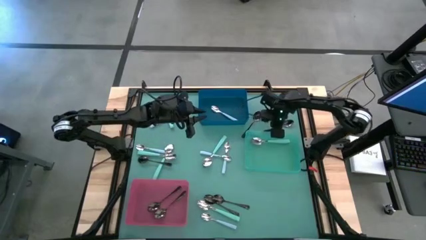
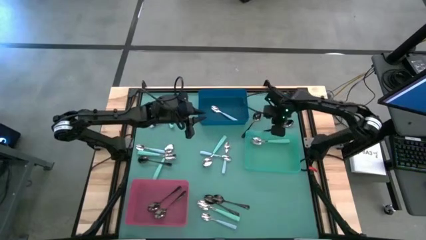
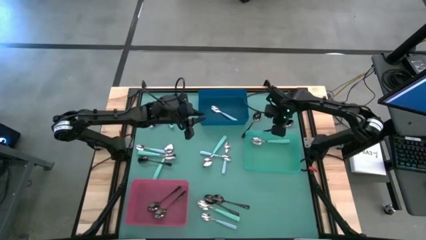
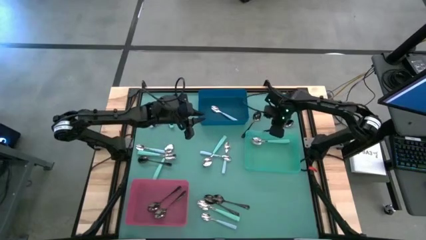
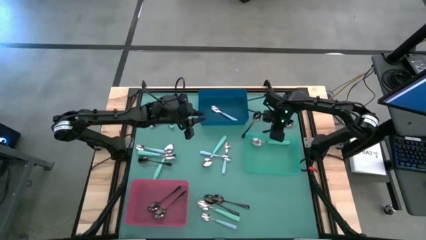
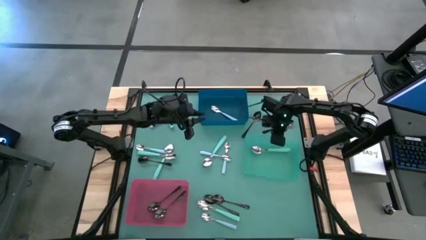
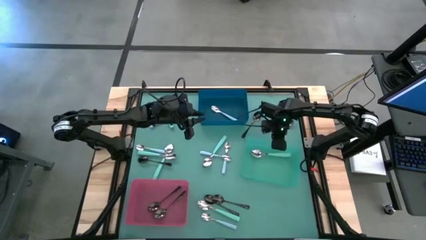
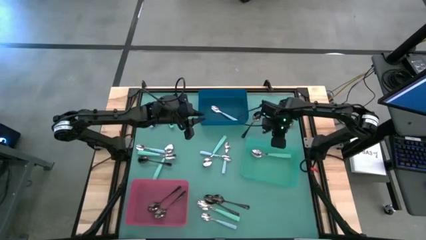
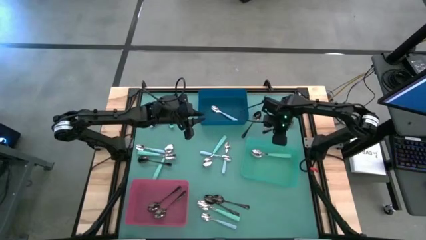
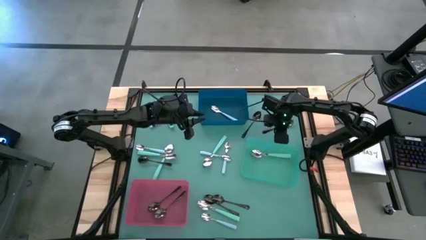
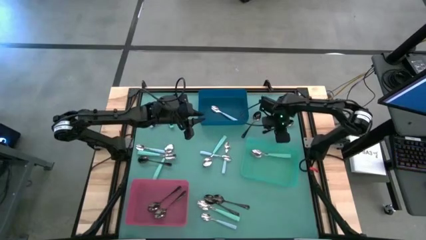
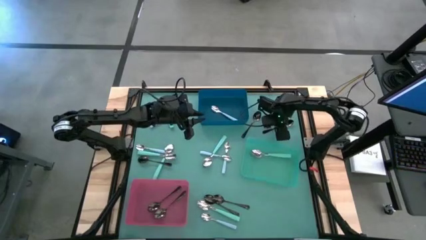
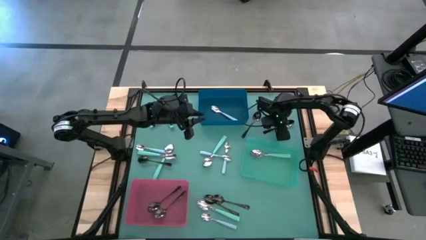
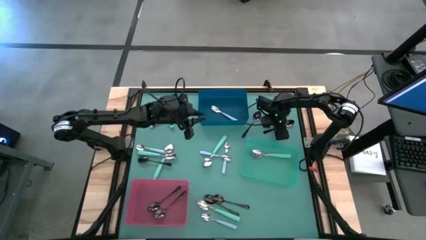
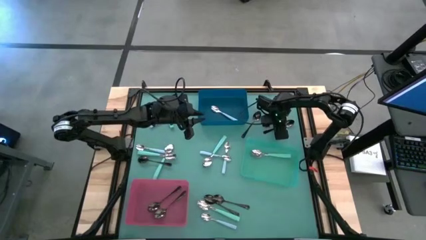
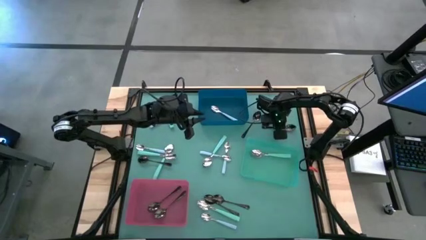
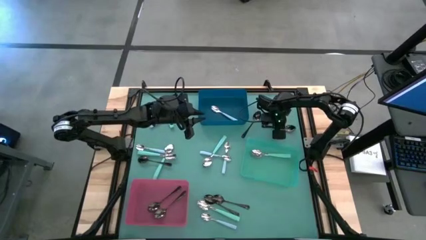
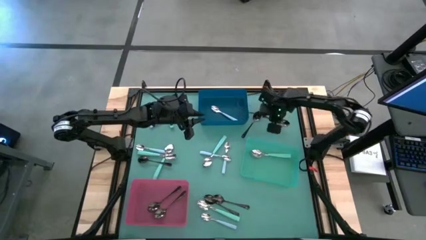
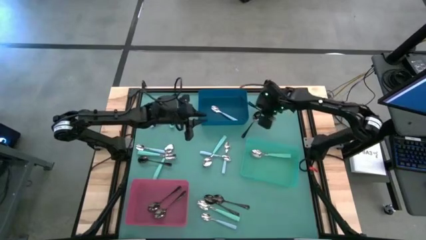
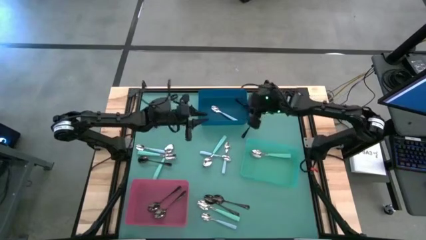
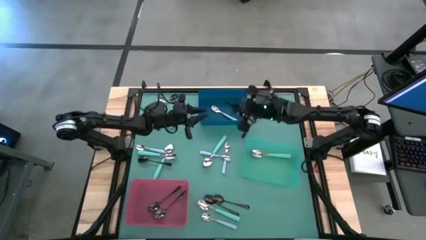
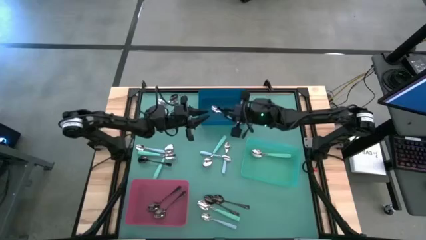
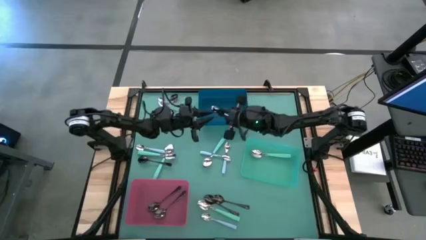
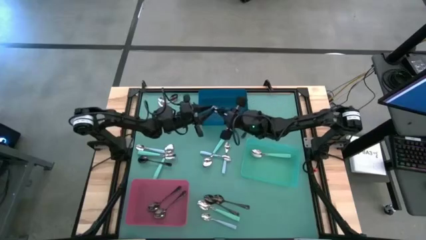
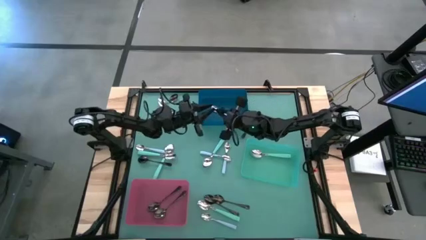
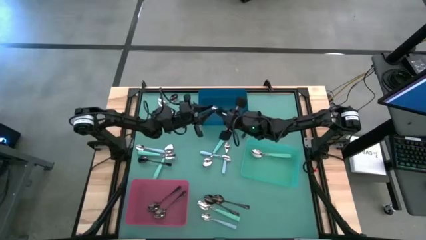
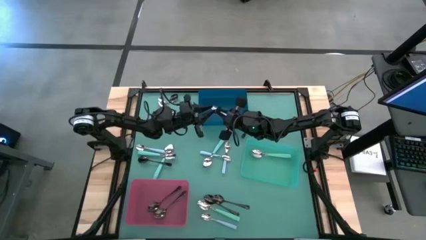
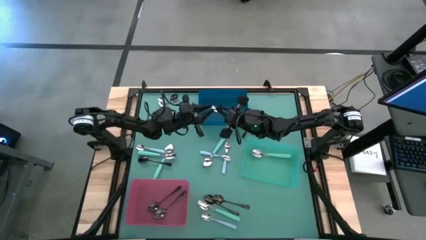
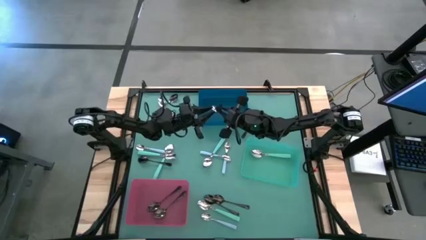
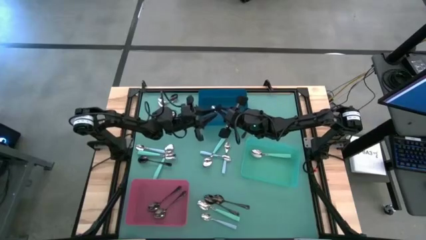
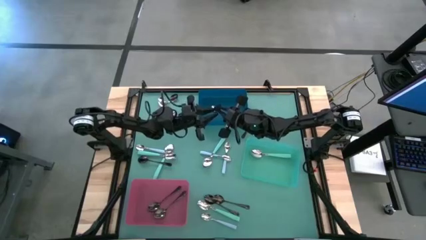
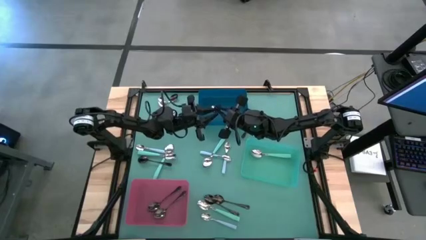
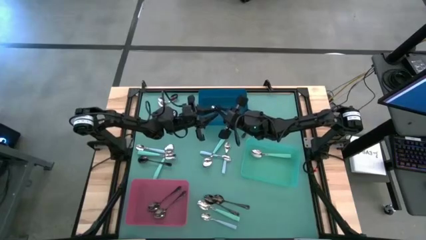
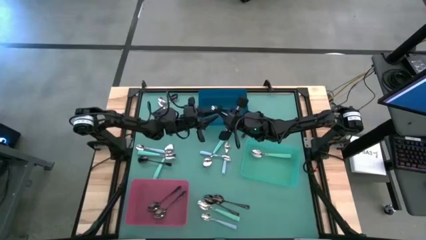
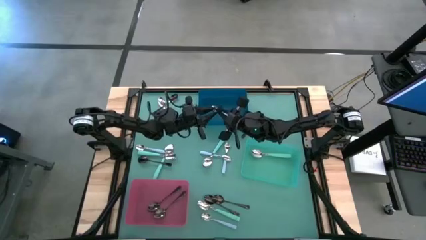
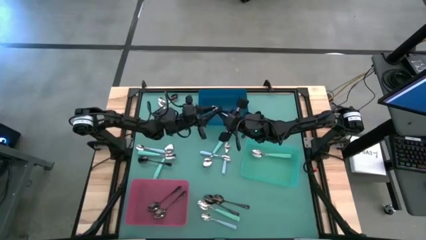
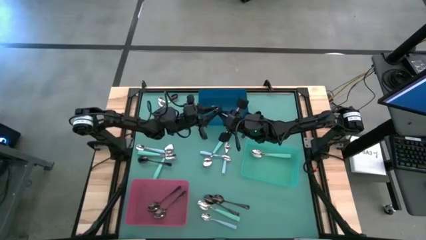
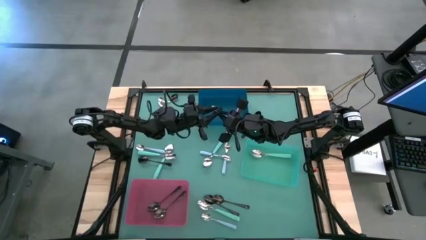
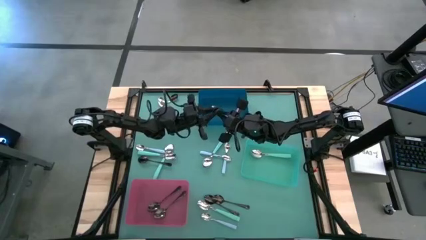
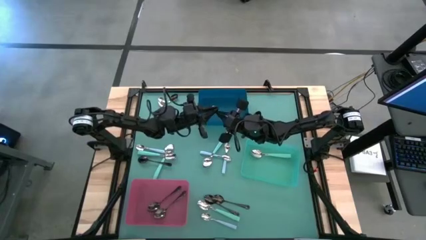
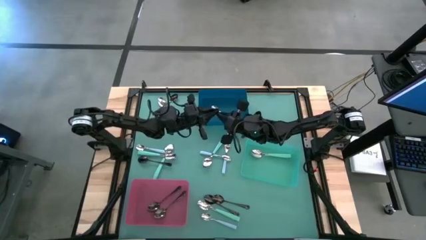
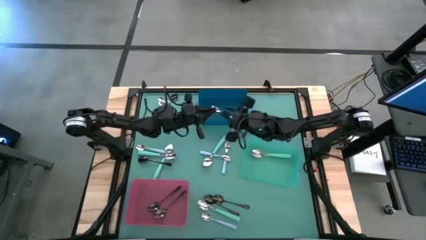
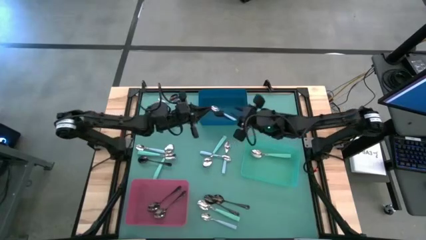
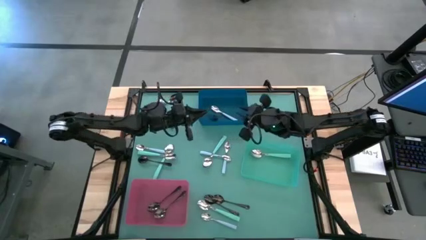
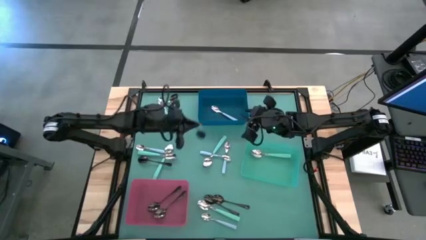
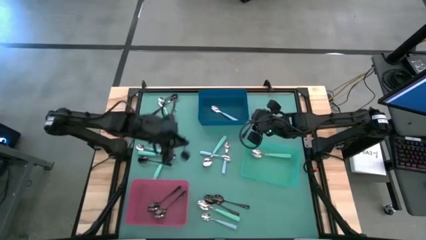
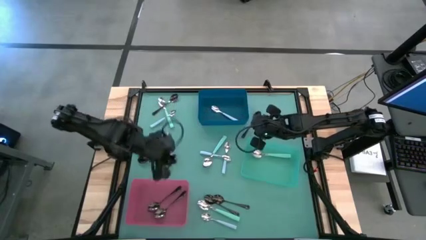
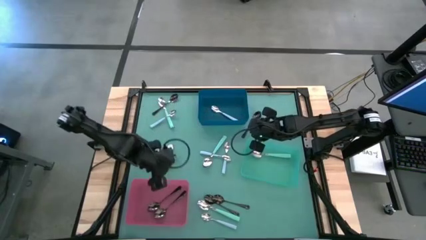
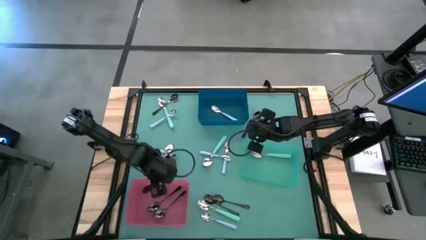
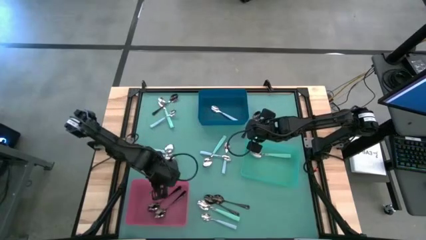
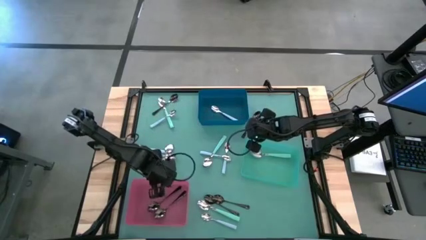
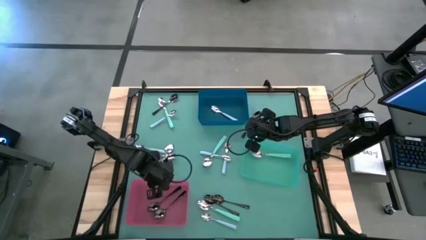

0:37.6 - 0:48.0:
Task: Sort silverware by color (type)
Put the black spoon into the red bin

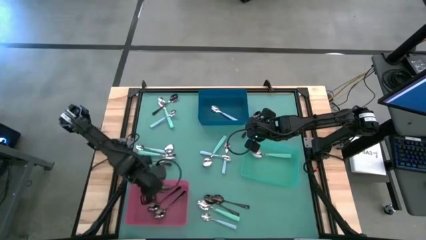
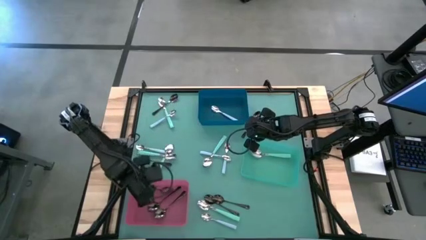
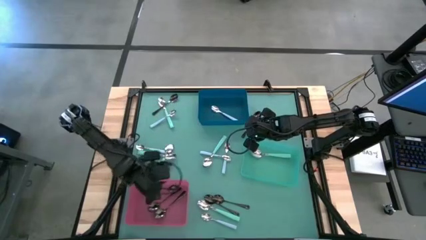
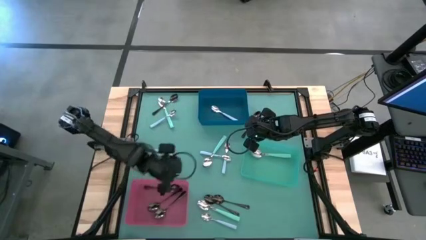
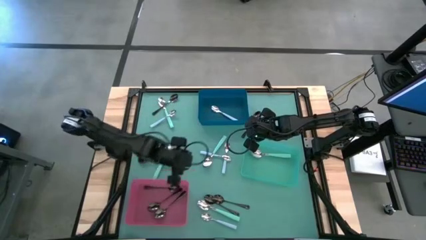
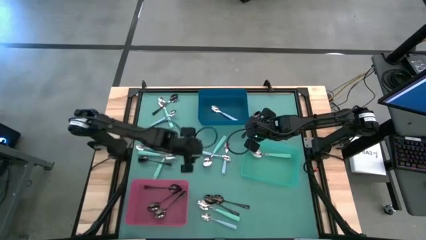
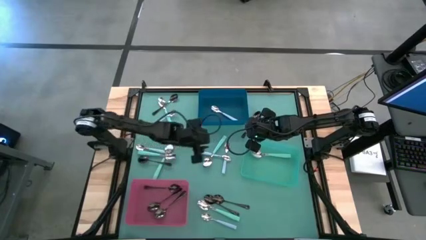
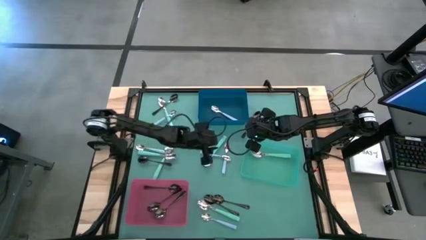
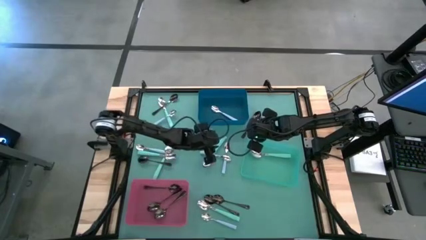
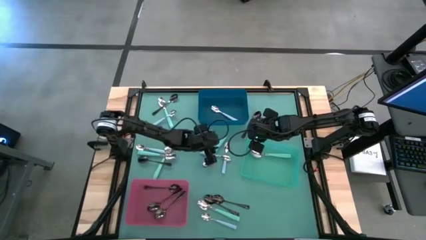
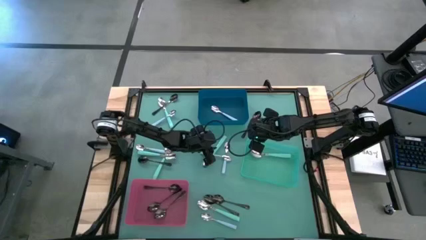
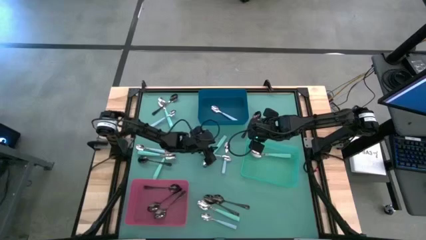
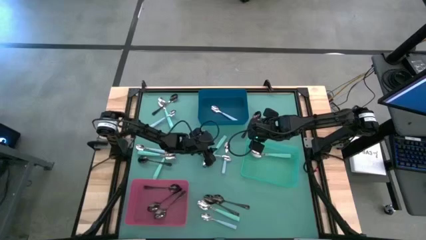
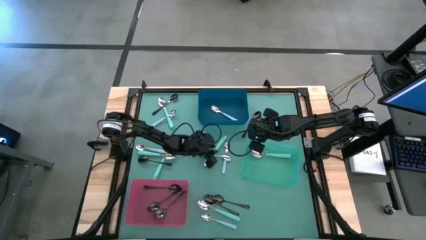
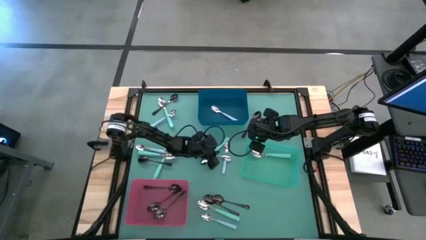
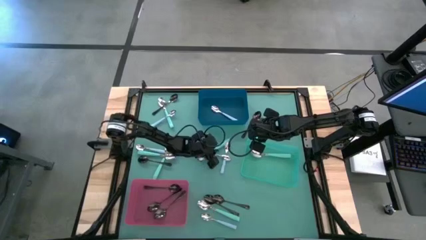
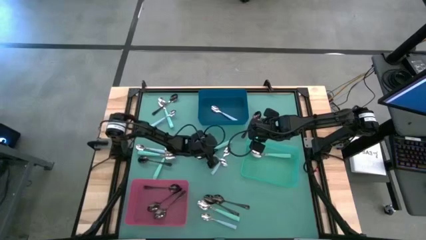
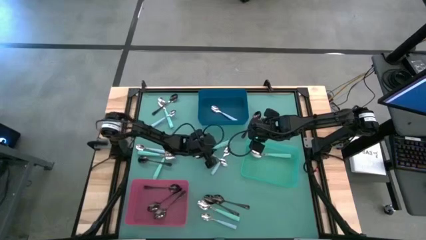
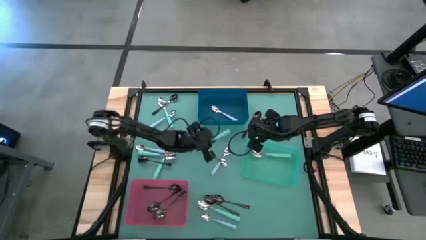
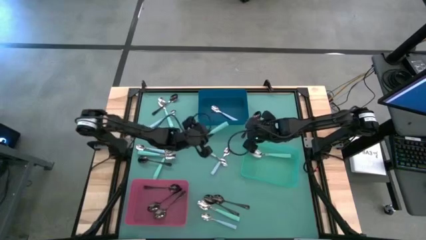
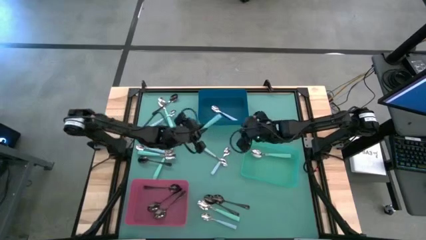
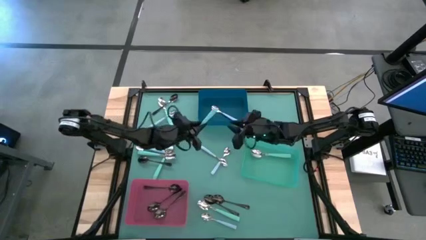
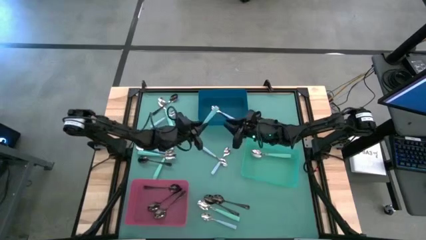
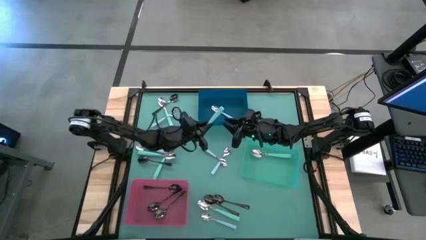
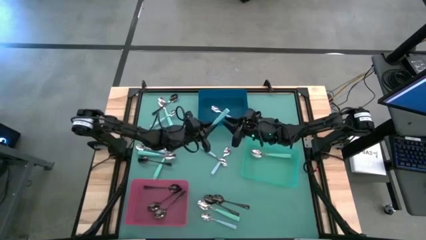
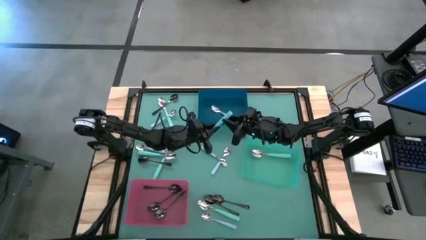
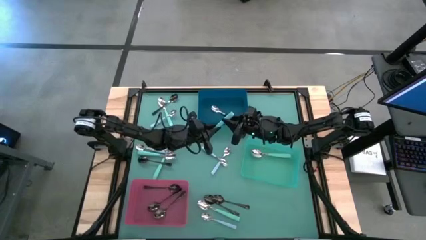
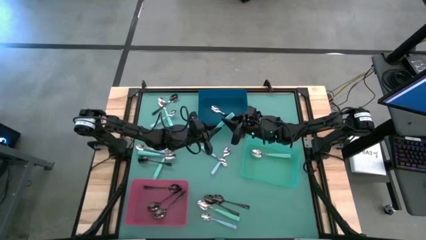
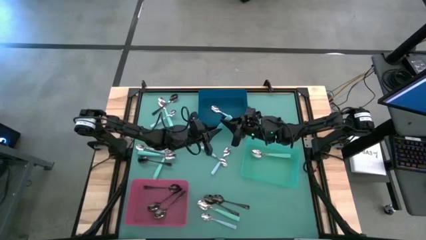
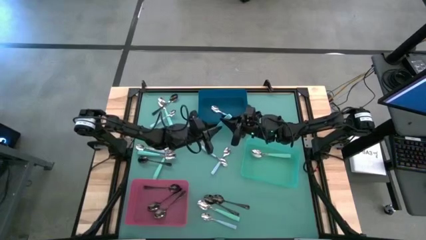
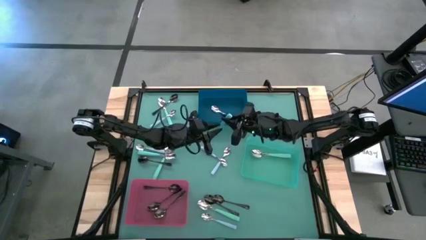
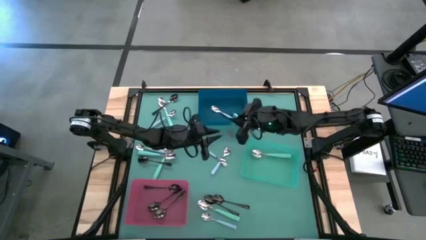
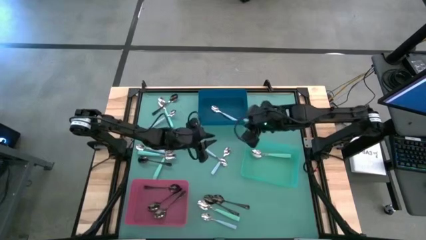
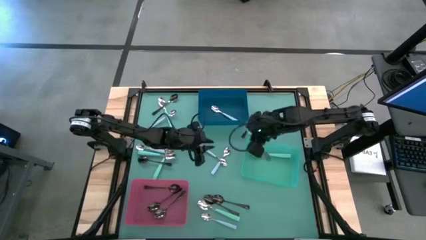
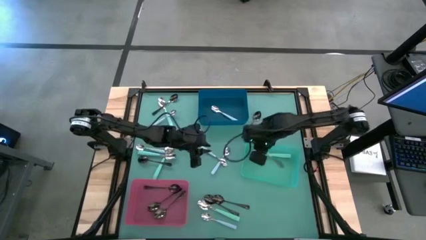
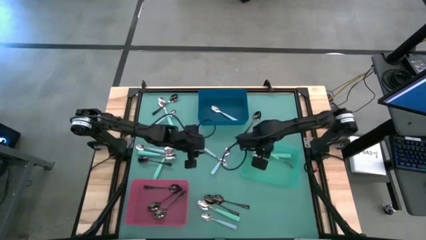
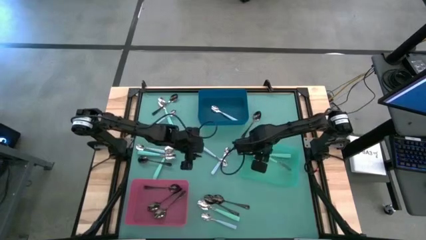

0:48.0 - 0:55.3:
Put the green spoon into the green bin
